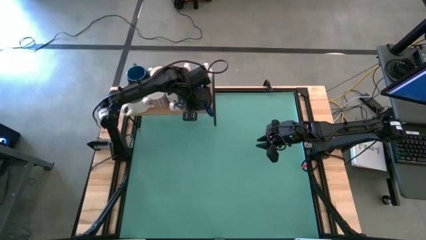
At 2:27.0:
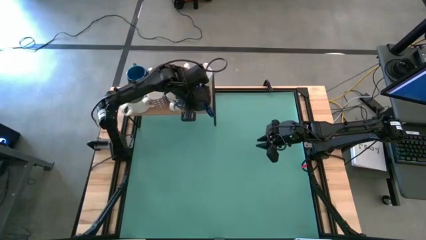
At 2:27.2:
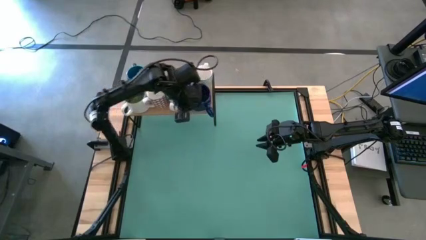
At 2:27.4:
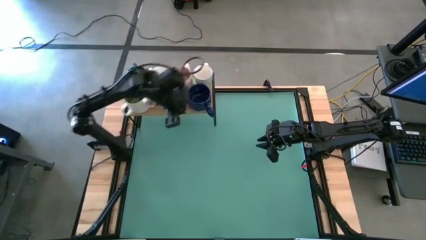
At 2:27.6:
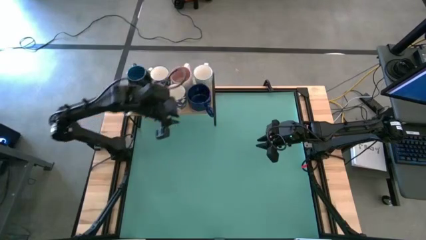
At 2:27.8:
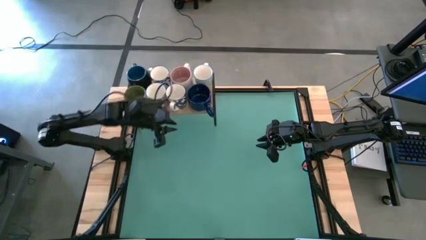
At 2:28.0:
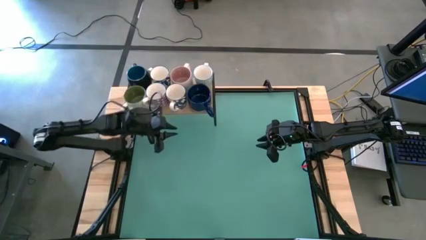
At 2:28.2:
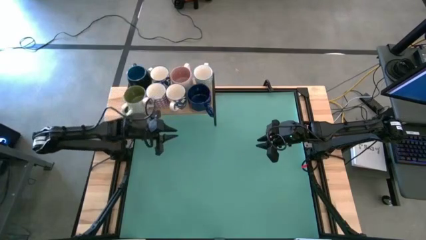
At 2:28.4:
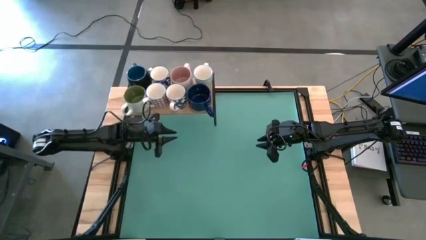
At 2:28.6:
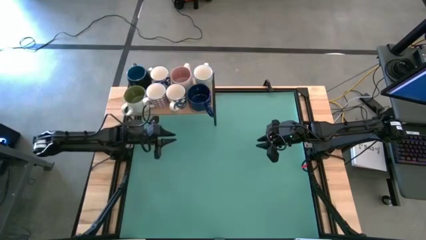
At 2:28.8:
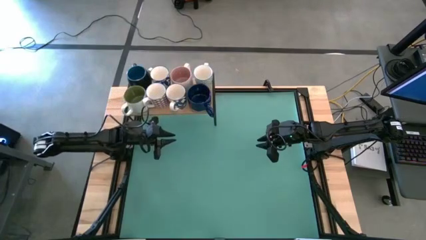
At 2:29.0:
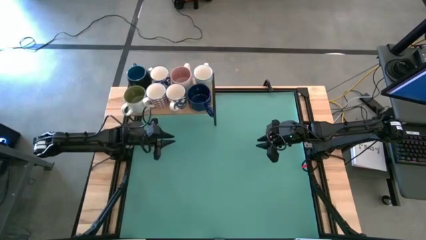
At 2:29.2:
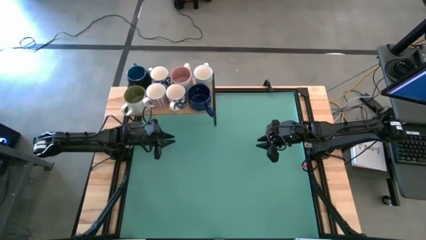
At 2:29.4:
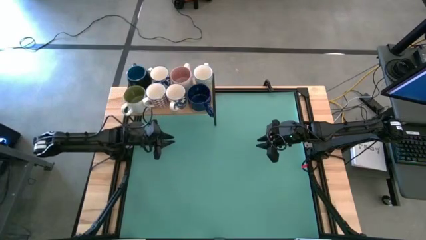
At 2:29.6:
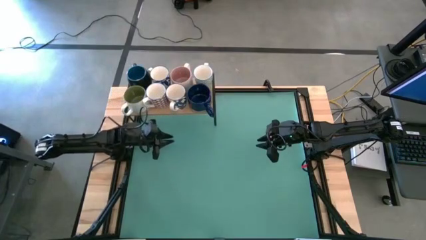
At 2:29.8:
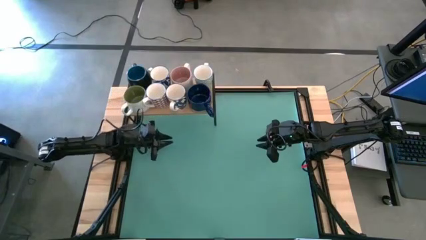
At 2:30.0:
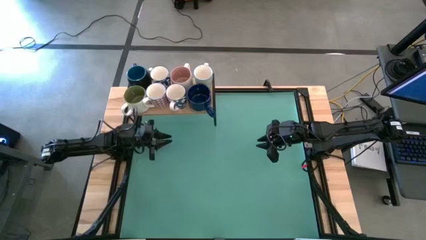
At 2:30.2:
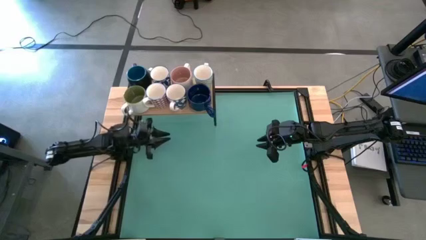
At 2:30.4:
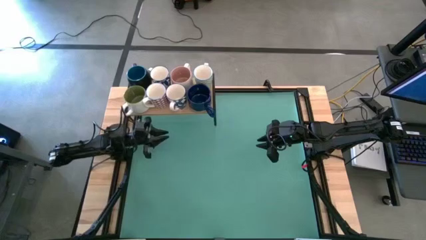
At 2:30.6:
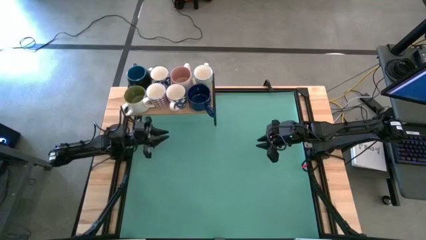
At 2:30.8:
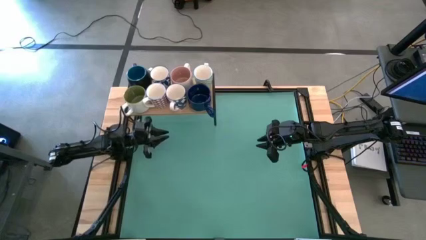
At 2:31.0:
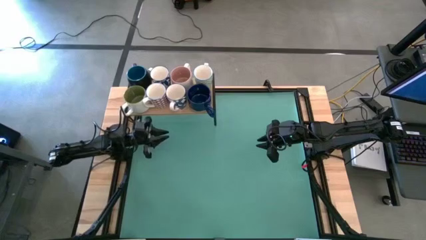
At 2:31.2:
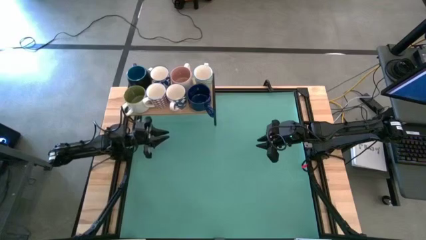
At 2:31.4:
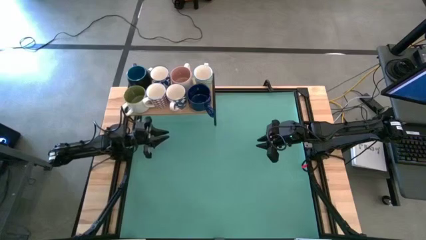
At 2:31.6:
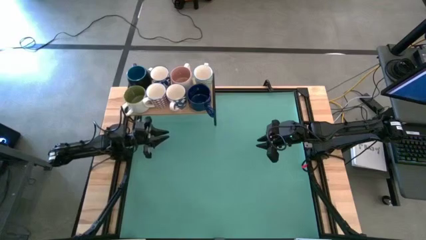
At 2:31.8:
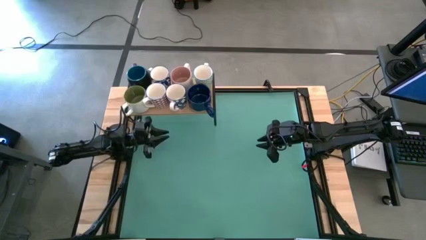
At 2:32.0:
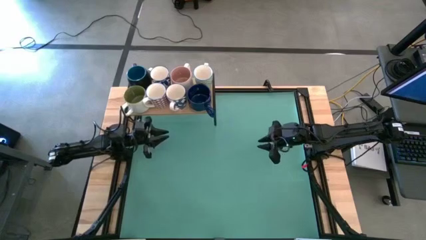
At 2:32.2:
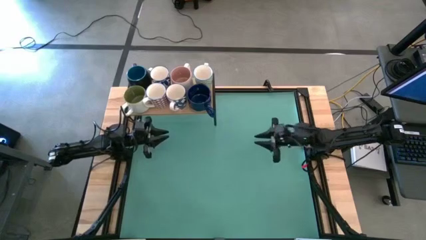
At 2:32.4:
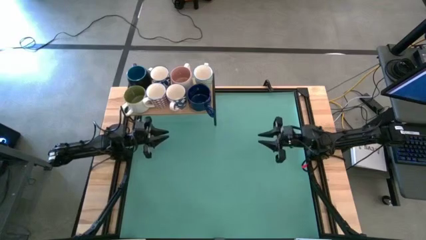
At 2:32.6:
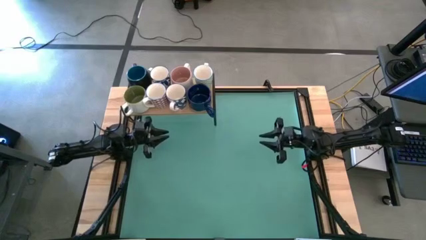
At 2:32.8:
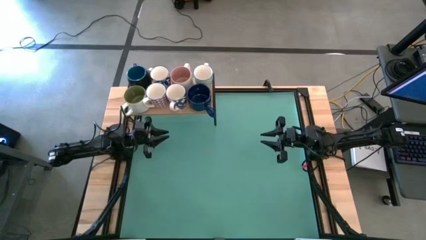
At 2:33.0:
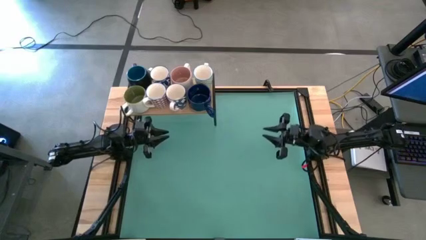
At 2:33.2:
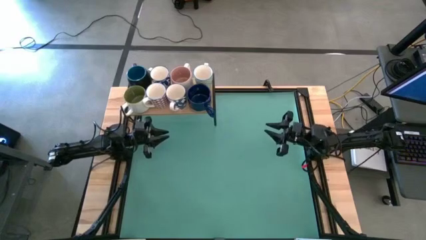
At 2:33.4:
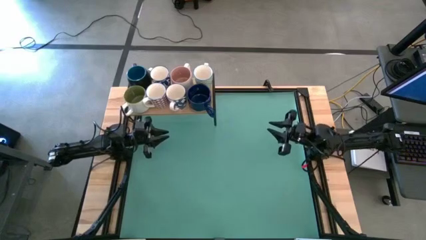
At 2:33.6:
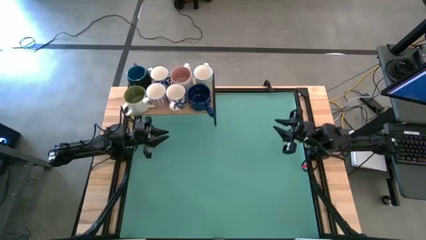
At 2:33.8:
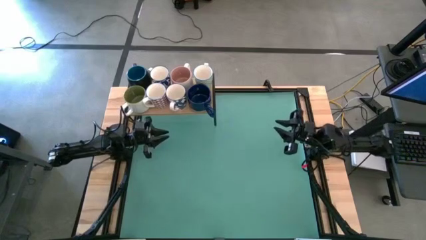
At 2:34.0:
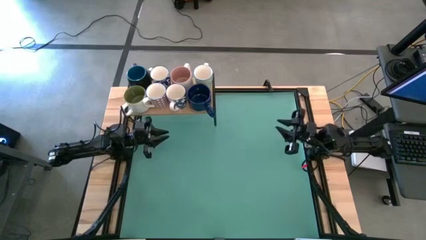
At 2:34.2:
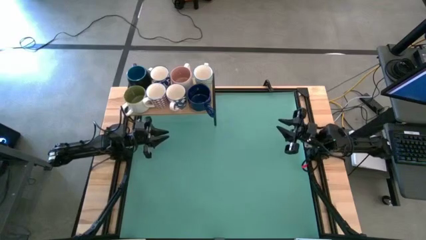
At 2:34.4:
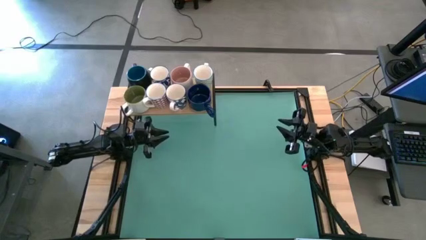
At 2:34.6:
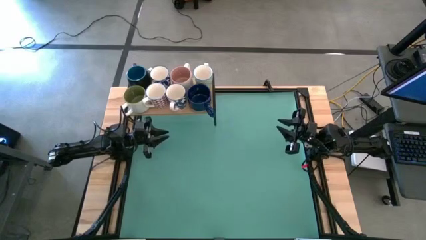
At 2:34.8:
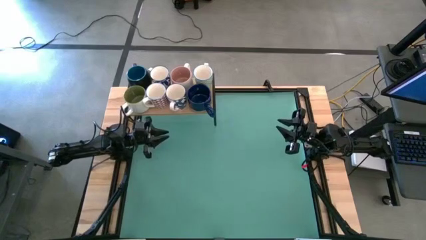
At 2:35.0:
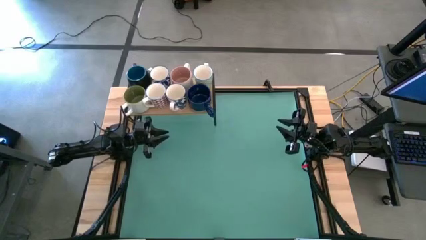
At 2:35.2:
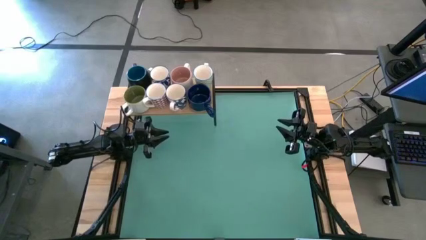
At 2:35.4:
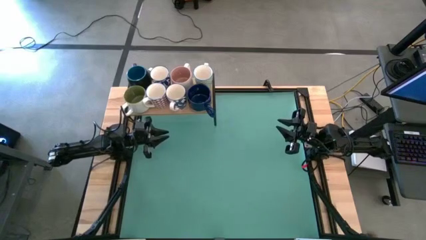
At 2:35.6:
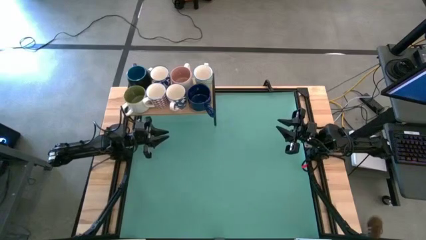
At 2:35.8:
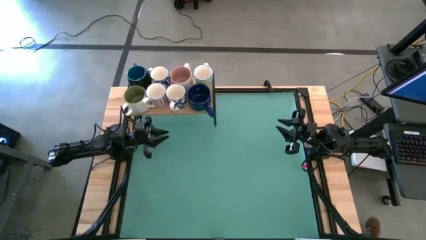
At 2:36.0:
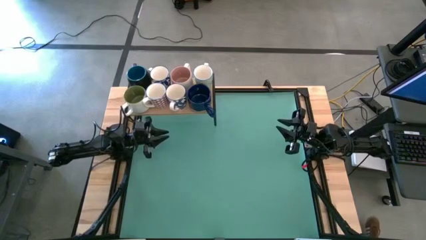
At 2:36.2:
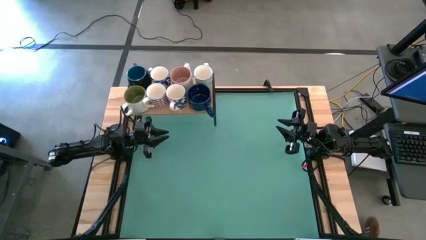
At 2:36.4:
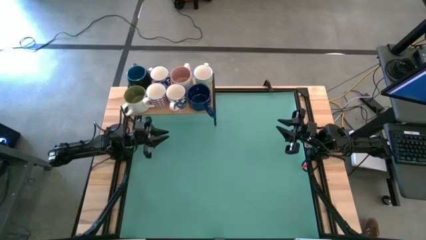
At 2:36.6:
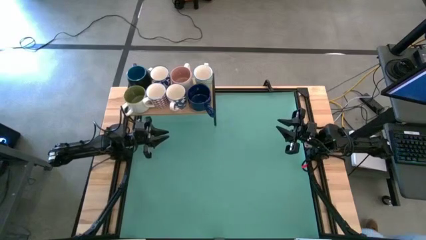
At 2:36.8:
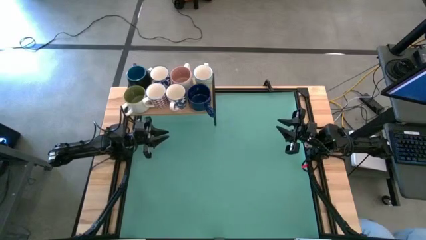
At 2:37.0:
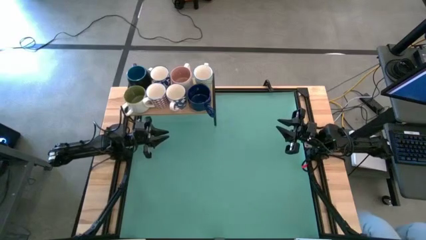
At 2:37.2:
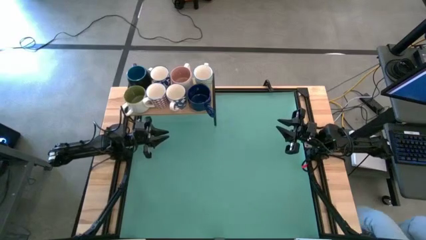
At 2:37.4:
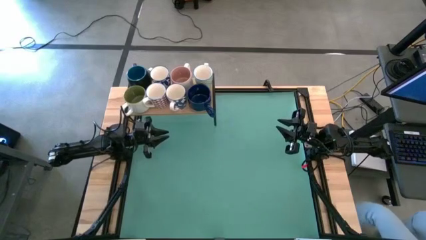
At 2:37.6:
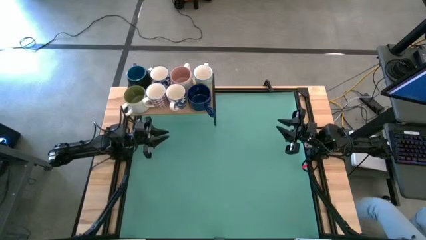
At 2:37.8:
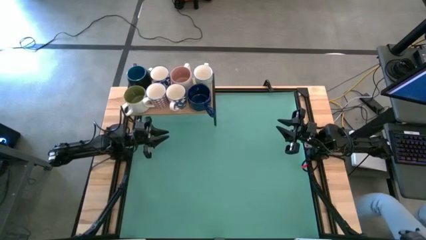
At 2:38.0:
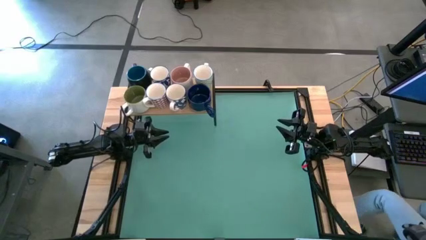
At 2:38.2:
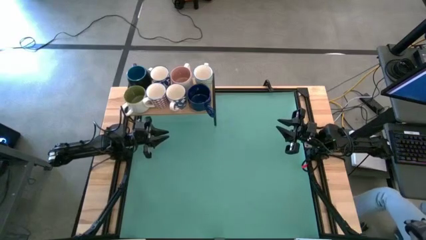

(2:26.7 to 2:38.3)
Task: Place coffee mugs
Return to Home Position

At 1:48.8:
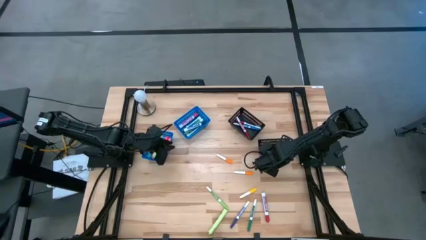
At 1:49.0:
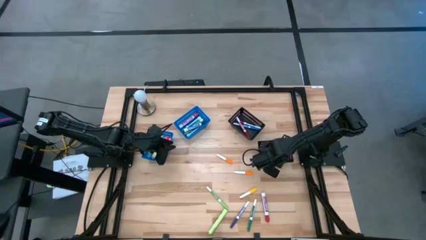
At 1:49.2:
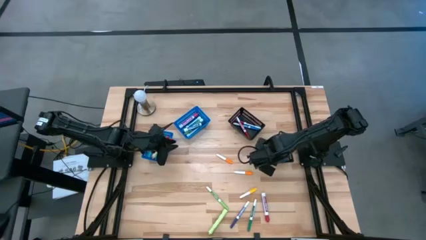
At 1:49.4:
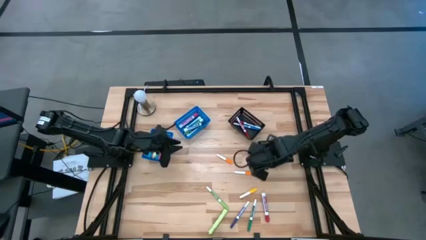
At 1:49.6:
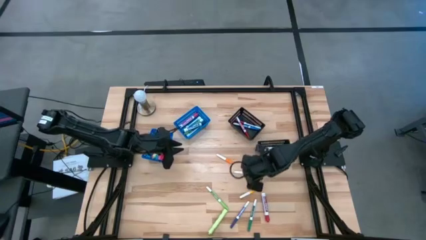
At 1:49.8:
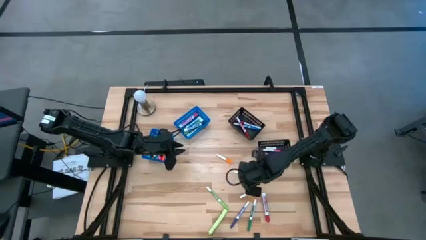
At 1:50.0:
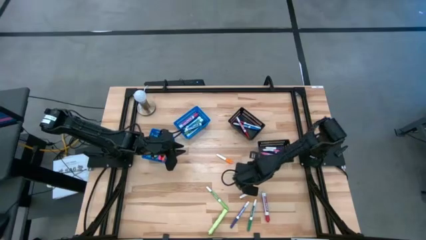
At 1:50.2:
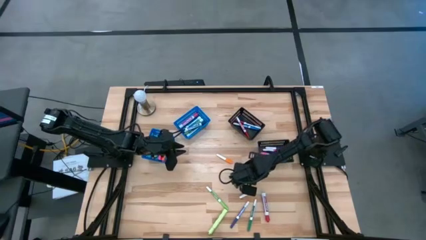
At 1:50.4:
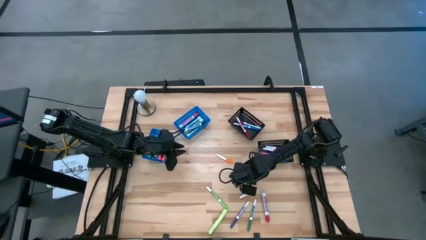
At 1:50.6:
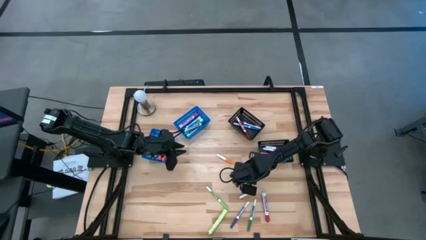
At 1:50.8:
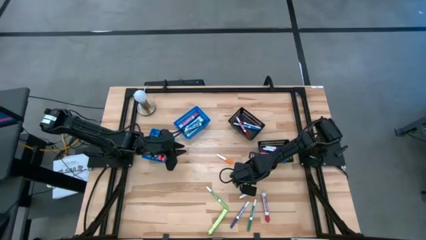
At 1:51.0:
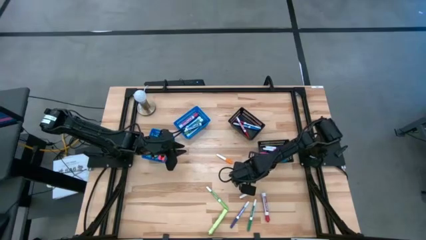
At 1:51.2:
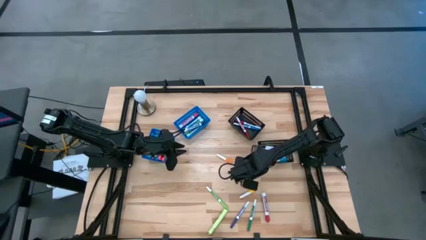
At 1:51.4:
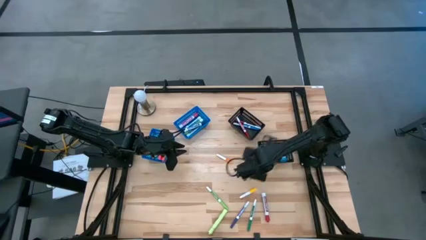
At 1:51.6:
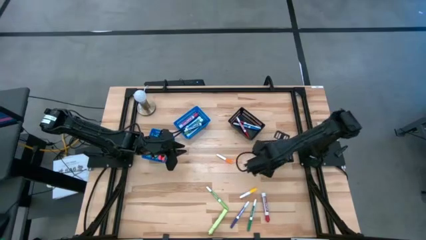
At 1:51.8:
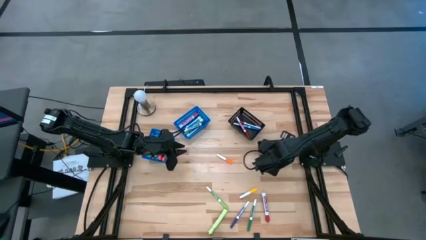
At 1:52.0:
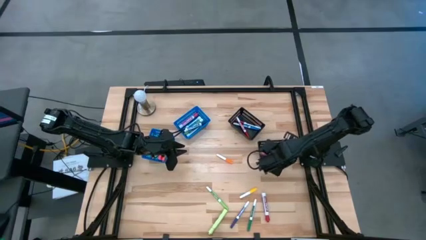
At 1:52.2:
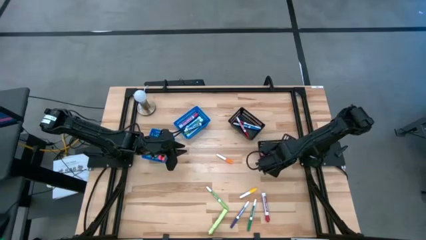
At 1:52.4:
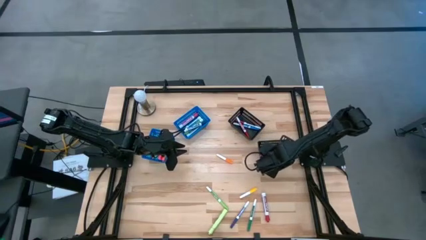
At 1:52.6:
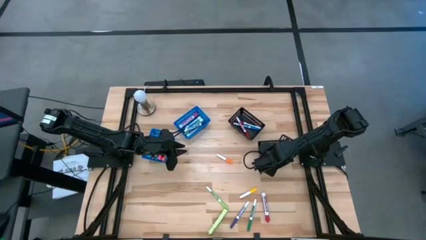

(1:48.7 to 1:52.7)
Task: Pick & Place Markers
Put the bottom orange highlighter pen into the left blue bin

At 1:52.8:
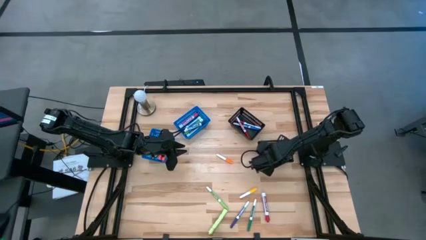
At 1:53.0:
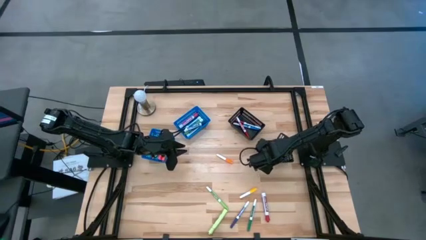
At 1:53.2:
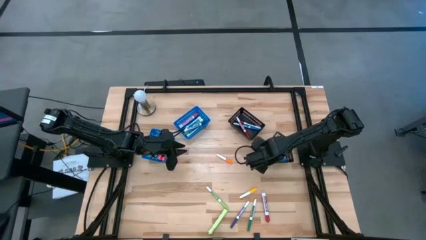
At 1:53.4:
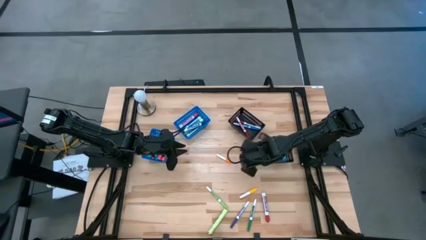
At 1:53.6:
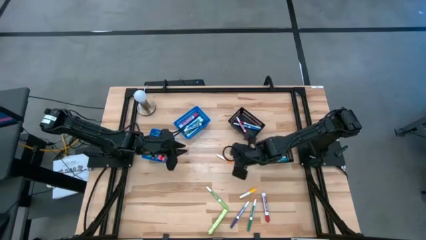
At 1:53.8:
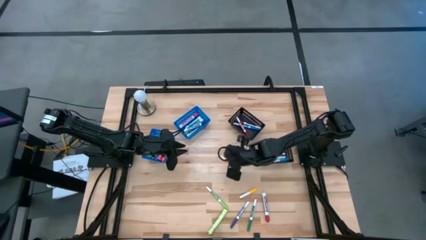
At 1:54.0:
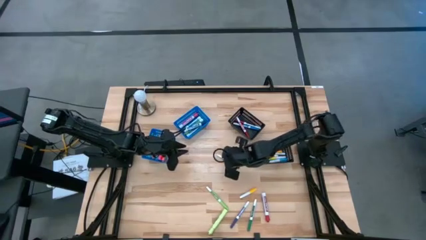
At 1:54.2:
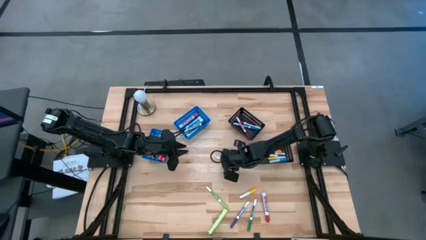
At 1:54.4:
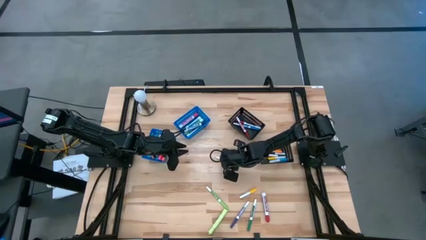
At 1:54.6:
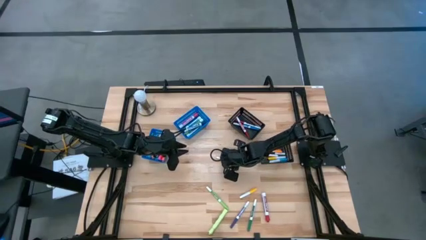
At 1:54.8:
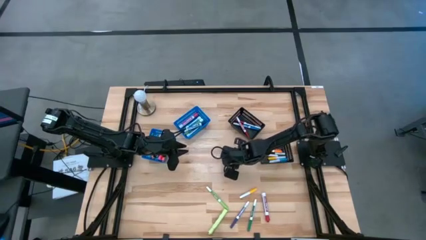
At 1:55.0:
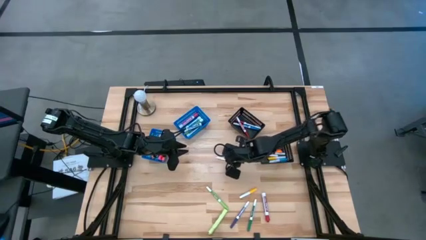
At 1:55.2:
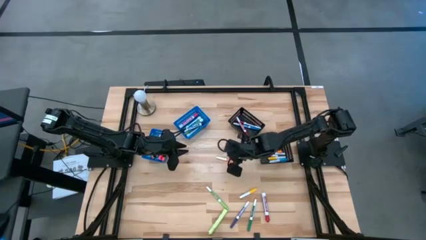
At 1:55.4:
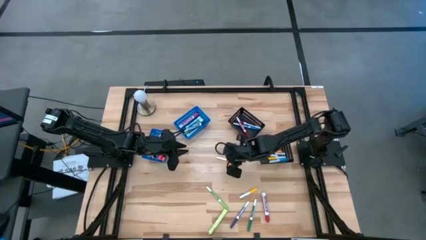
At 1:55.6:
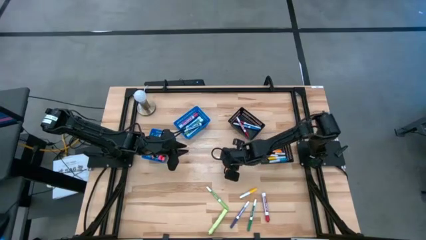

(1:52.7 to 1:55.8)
Put the orange highlighter pen into the left blue bin
